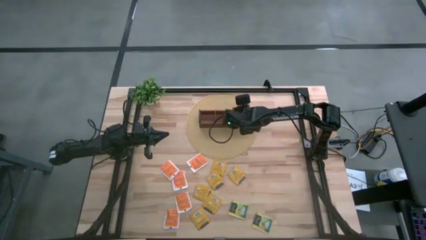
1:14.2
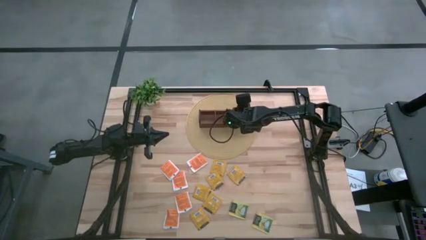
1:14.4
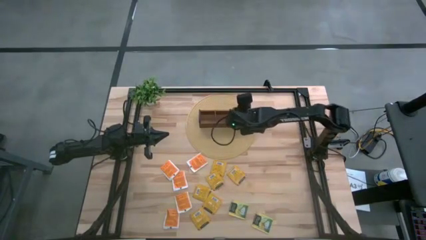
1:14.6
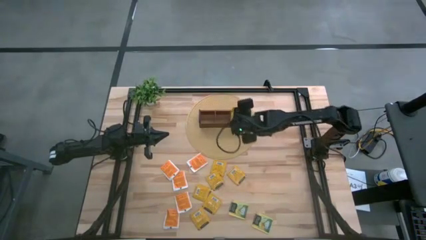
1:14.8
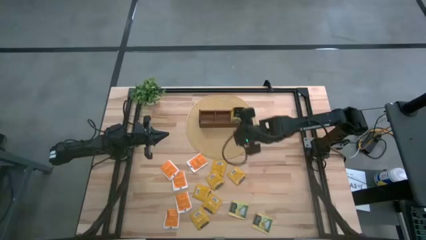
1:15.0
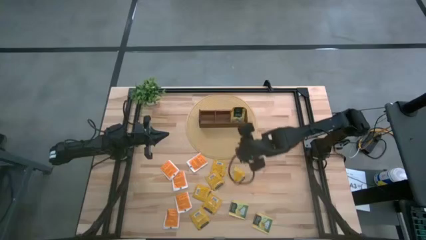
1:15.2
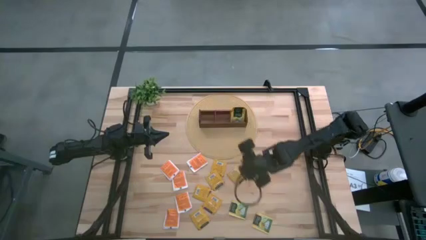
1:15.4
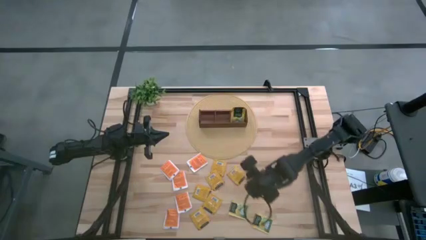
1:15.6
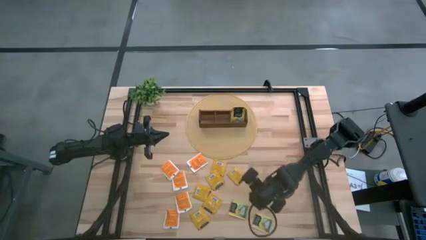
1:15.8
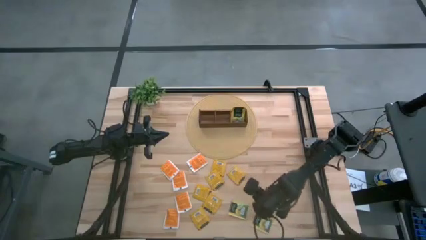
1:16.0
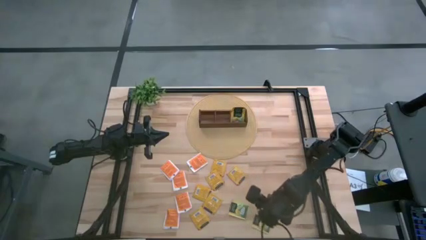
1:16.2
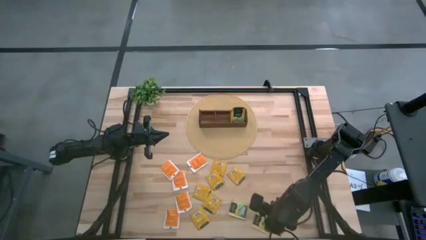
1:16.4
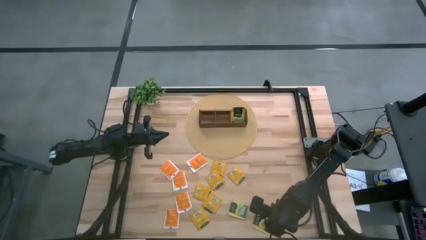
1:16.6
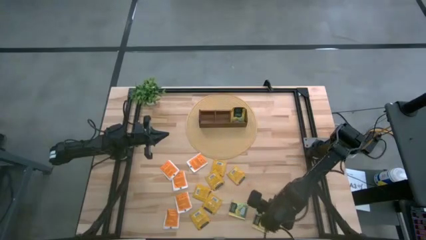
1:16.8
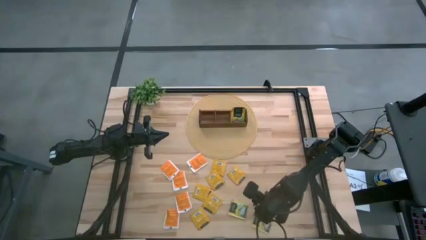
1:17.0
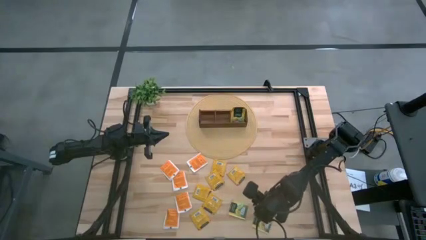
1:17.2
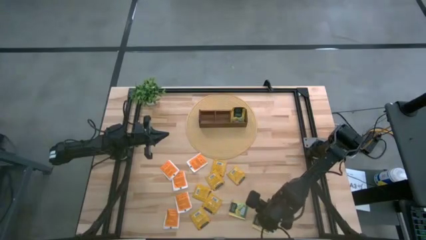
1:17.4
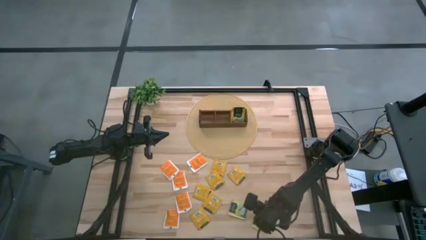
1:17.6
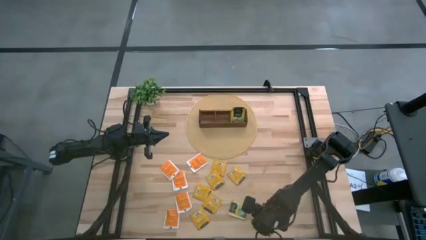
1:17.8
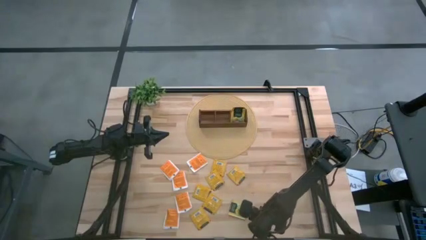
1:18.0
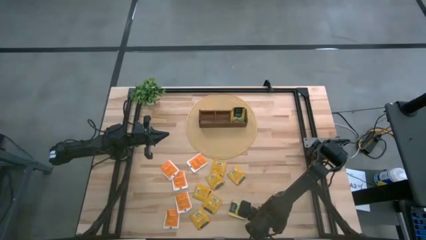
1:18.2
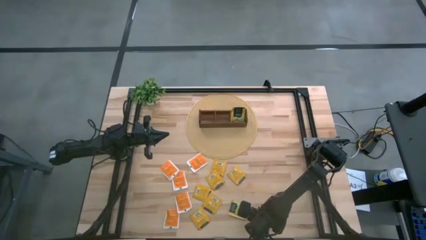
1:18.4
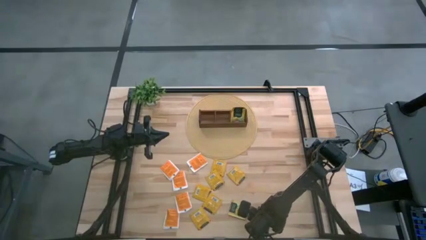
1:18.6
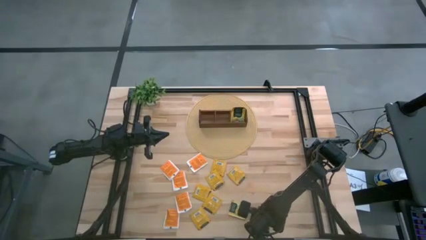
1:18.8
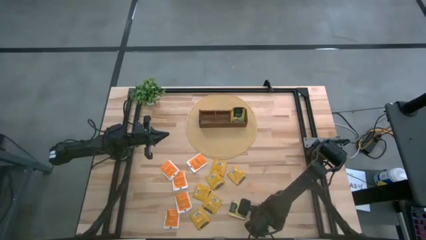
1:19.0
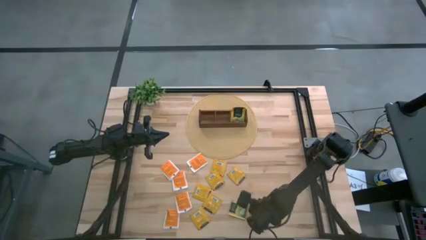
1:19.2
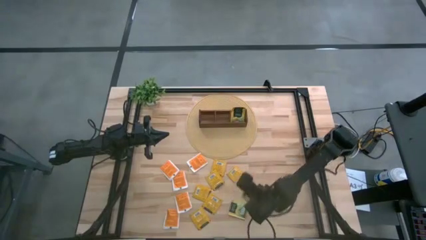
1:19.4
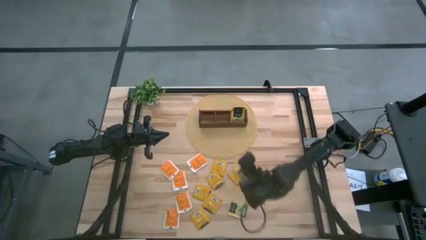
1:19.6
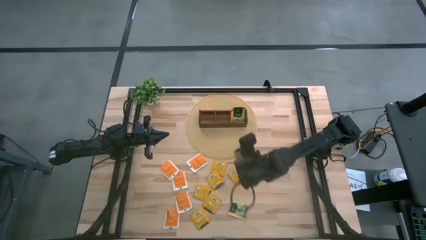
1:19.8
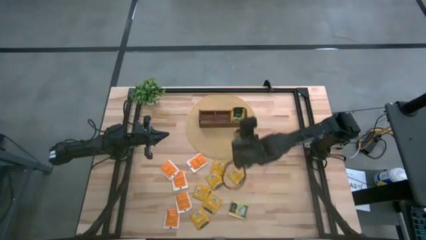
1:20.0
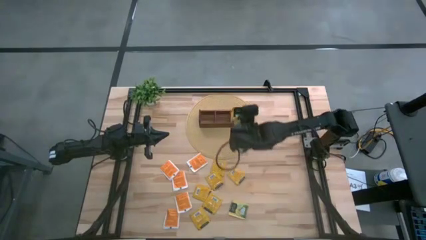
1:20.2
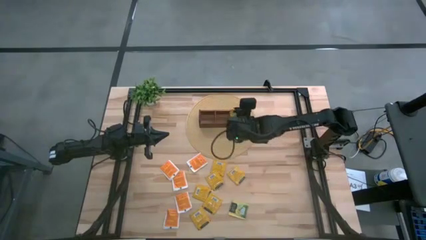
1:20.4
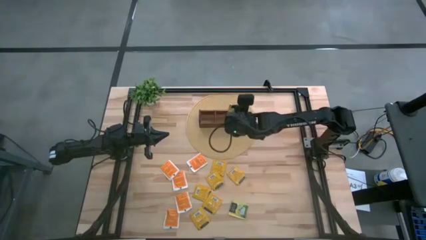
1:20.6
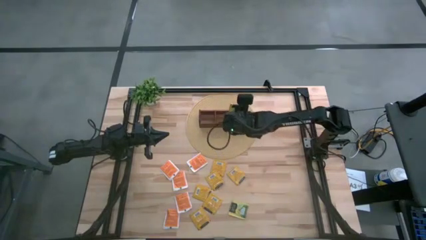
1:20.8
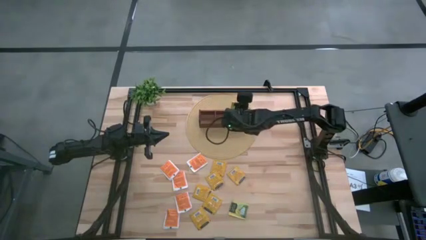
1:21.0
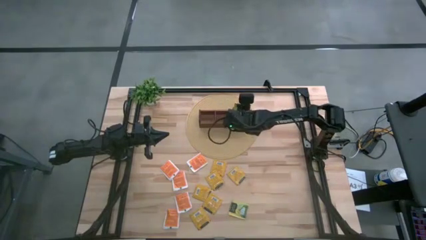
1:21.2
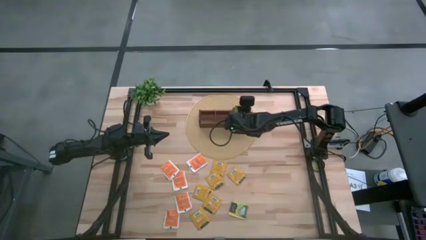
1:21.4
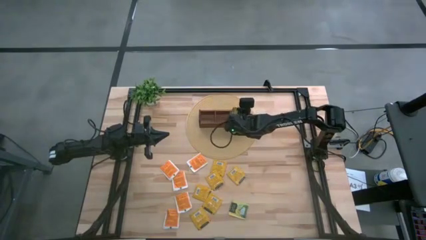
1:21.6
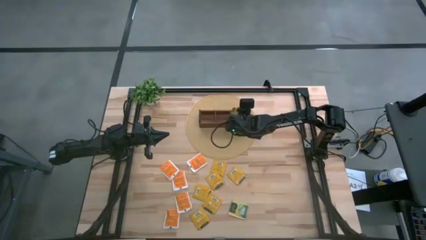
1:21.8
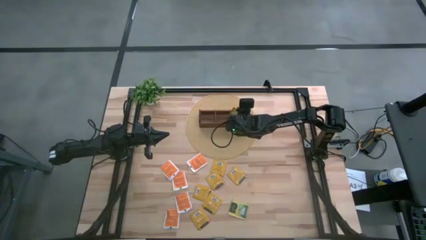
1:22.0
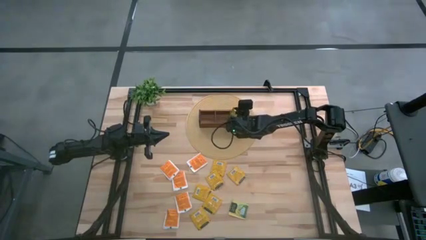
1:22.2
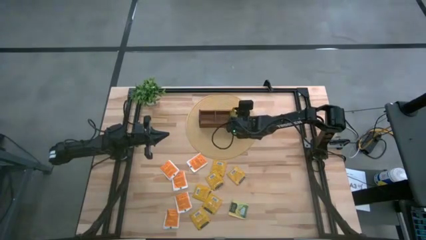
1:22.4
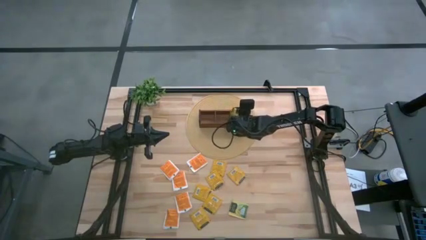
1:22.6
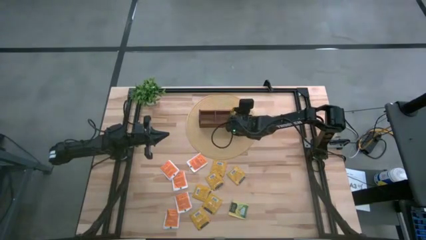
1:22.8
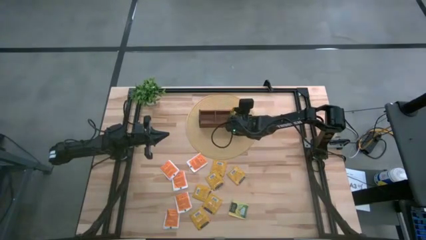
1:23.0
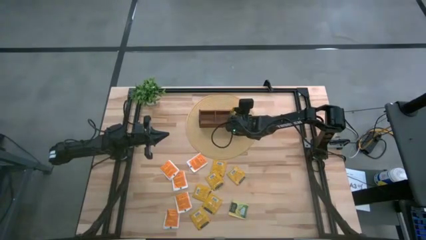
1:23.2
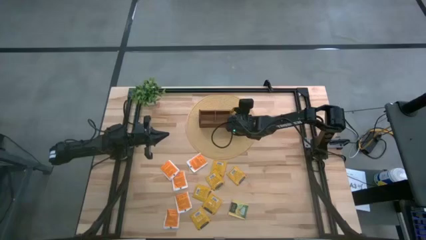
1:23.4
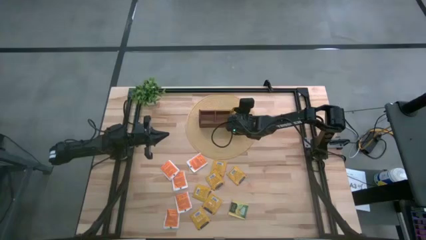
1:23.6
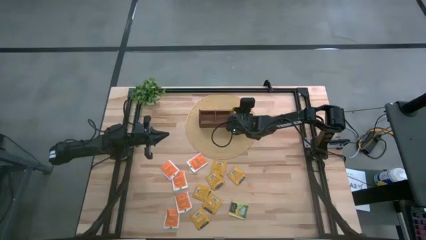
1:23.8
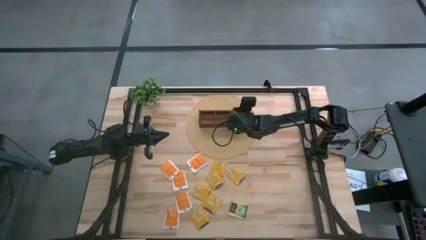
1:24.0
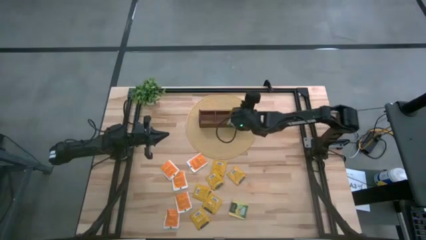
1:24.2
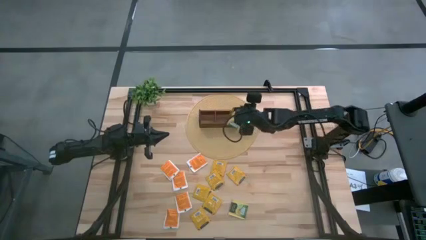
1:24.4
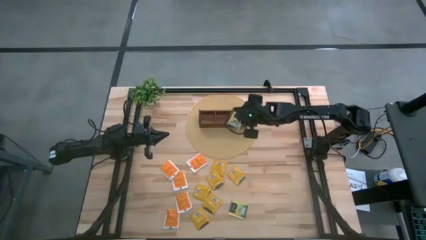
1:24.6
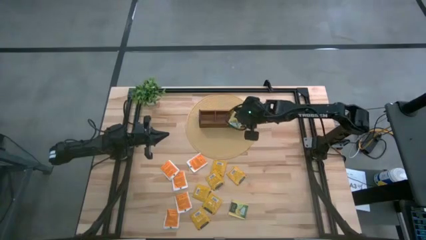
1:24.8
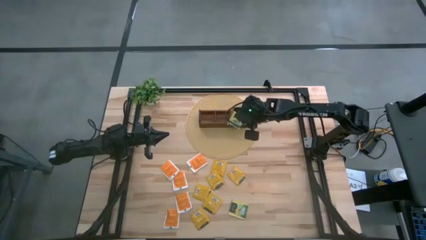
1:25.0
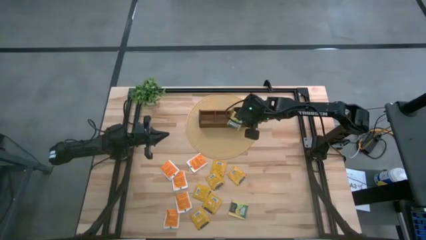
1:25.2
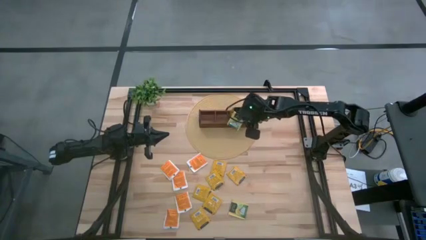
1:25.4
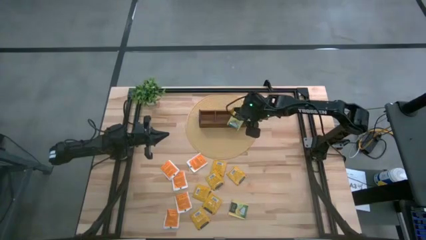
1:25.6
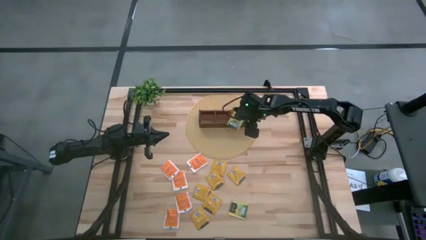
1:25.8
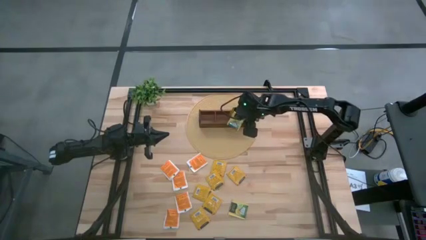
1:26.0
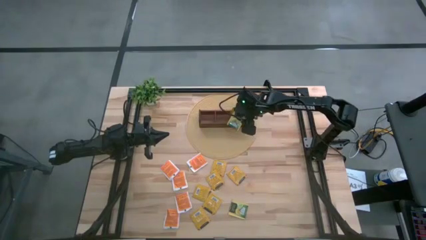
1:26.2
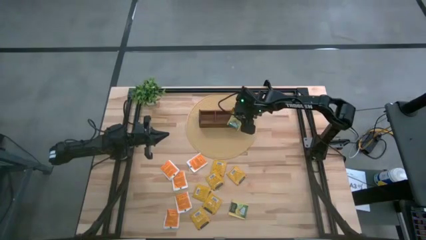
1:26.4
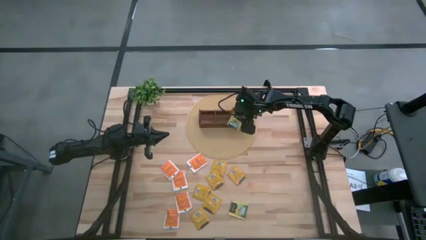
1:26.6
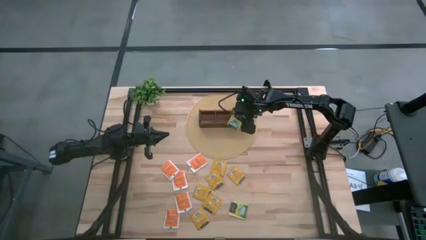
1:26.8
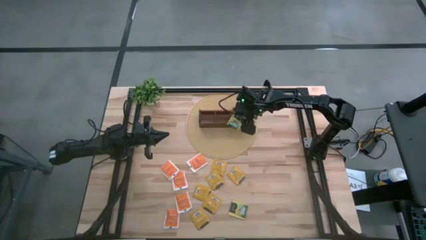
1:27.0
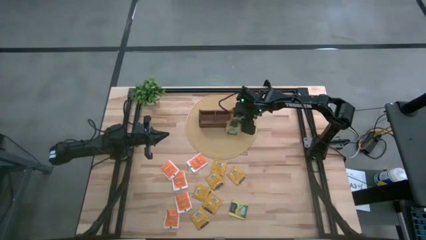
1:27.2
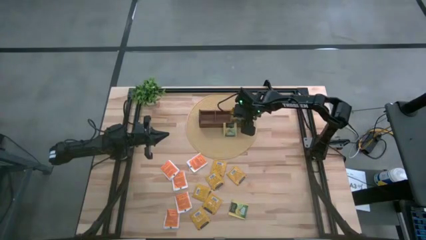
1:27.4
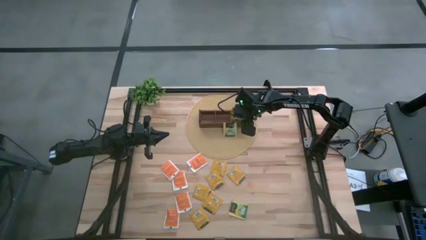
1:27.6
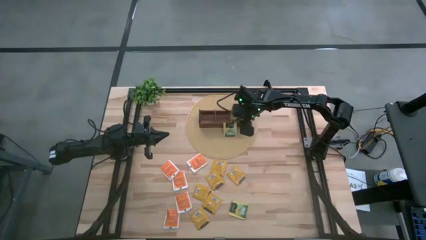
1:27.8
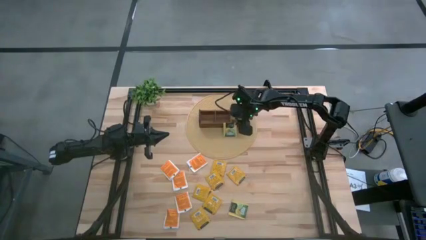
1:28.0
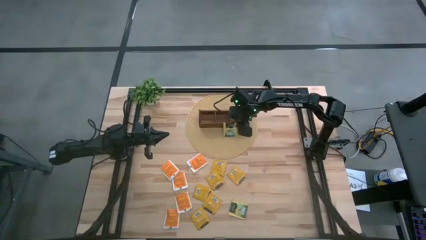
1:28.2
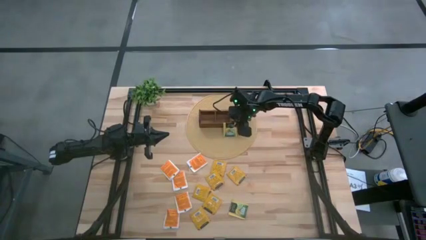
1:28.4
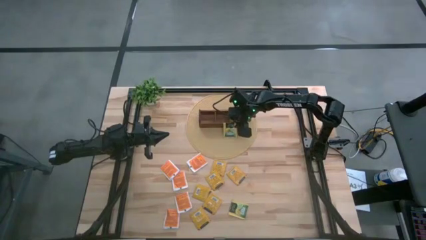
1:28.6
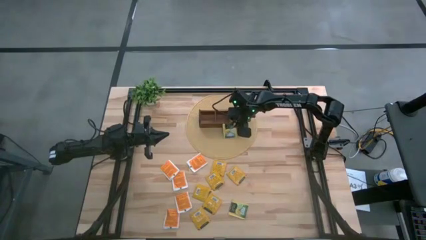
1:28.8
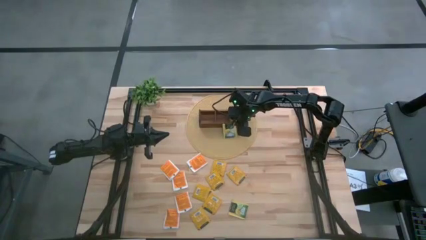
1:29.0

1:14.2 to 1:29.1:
Task: Pick & Place Tea
Put the right yellow tea bag into the right section of the wooden organizer
